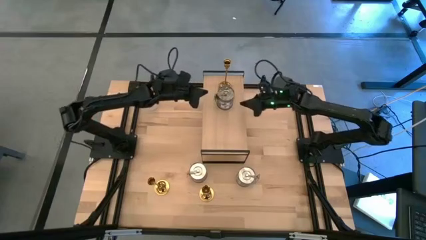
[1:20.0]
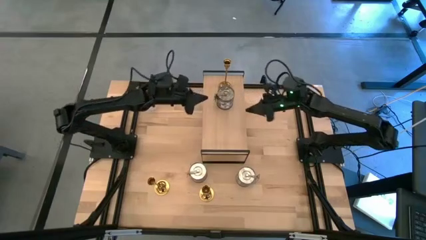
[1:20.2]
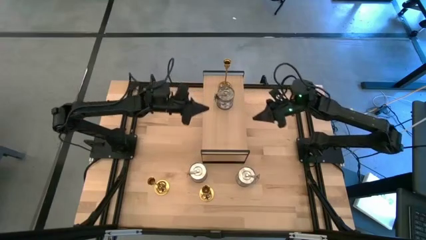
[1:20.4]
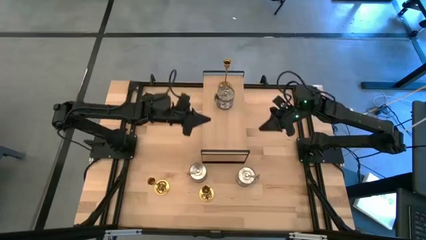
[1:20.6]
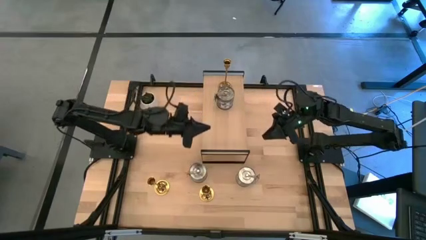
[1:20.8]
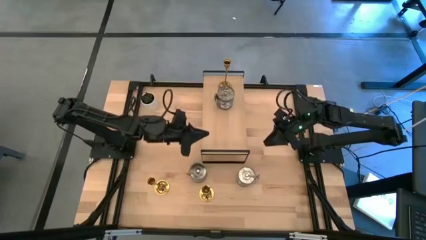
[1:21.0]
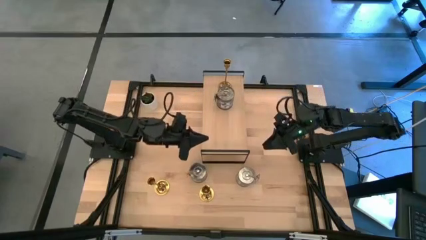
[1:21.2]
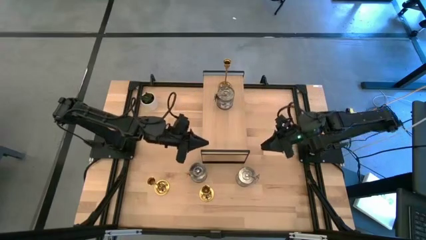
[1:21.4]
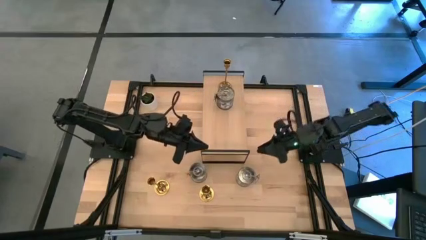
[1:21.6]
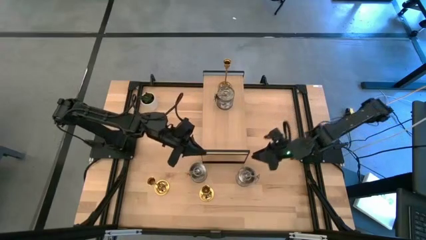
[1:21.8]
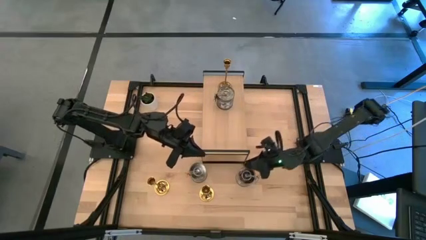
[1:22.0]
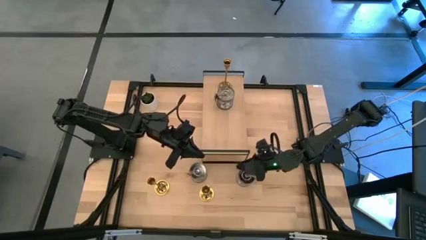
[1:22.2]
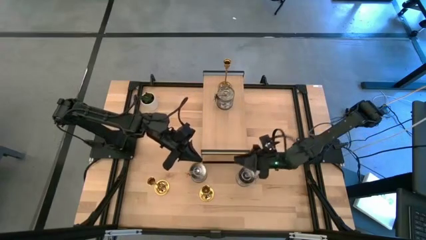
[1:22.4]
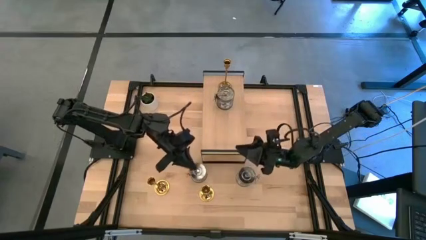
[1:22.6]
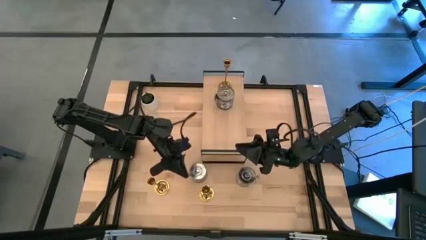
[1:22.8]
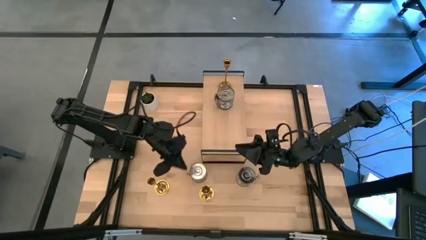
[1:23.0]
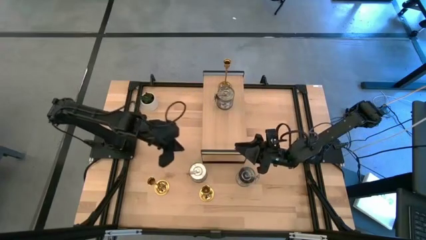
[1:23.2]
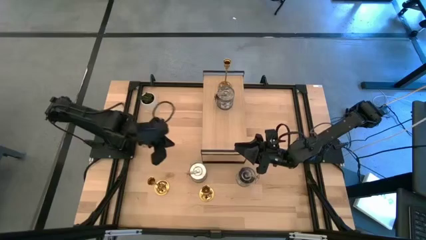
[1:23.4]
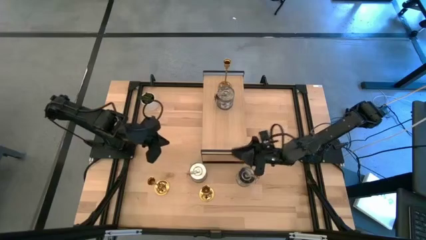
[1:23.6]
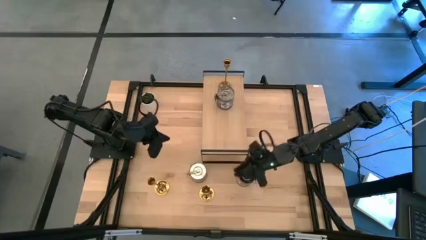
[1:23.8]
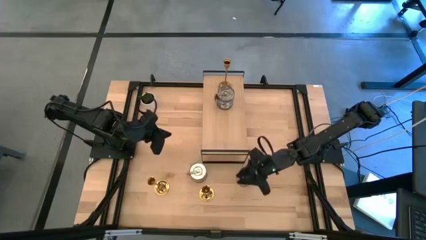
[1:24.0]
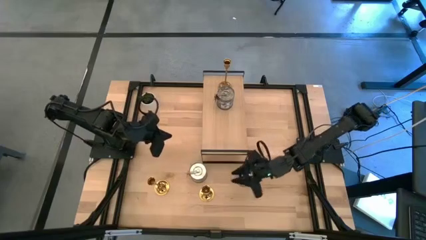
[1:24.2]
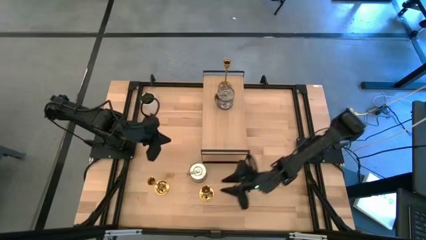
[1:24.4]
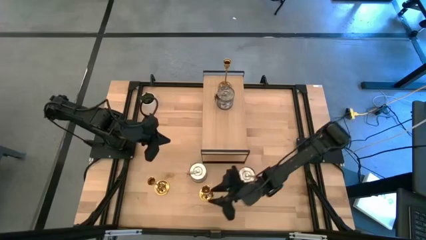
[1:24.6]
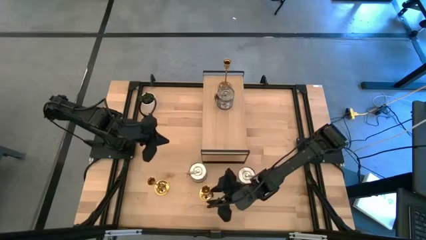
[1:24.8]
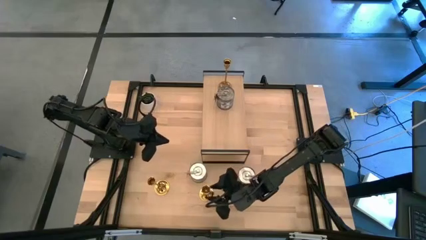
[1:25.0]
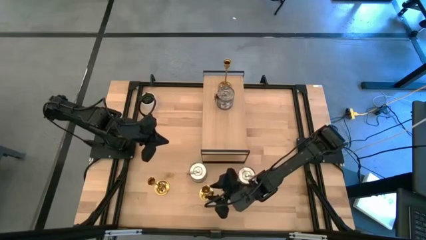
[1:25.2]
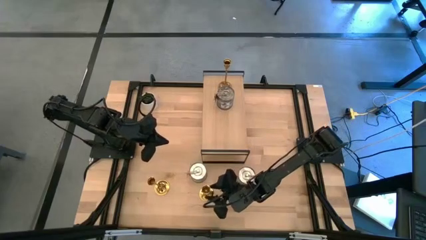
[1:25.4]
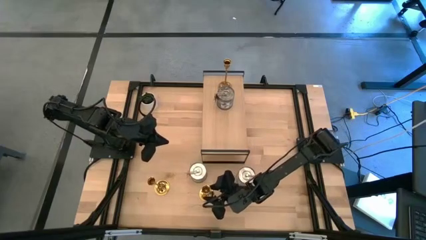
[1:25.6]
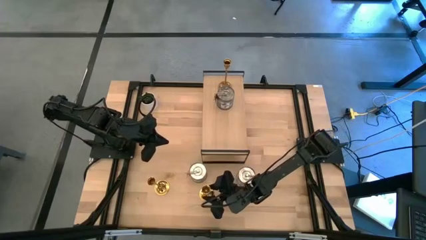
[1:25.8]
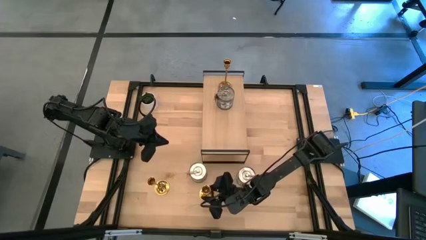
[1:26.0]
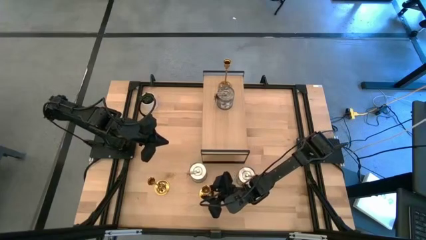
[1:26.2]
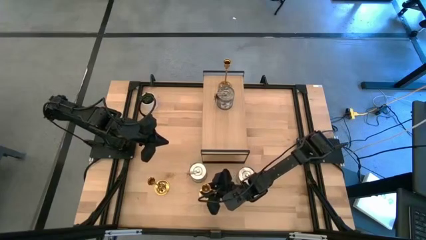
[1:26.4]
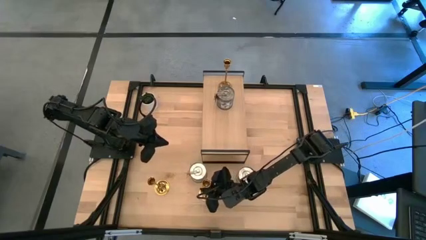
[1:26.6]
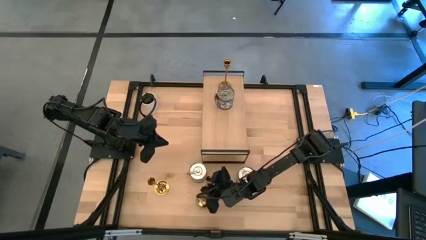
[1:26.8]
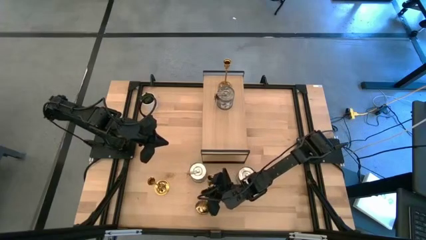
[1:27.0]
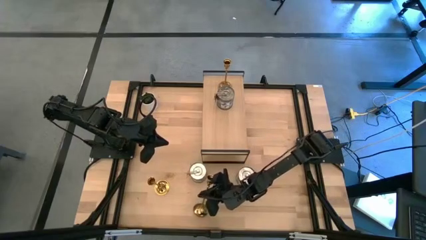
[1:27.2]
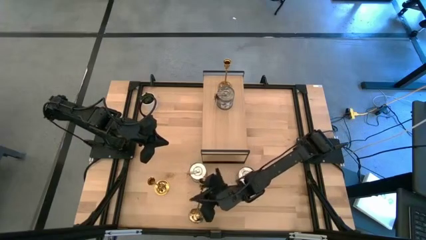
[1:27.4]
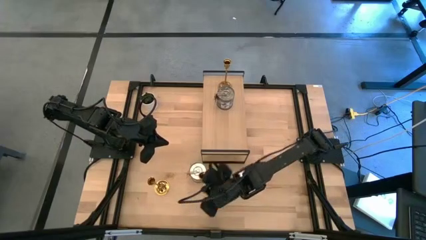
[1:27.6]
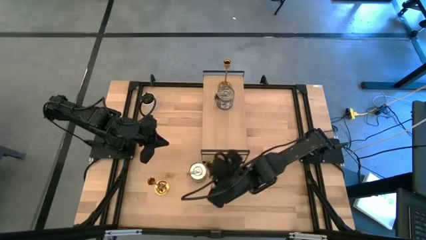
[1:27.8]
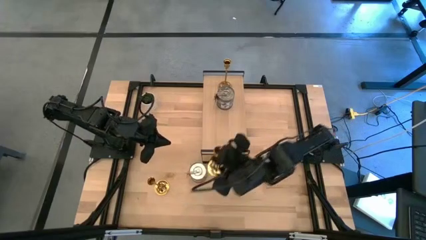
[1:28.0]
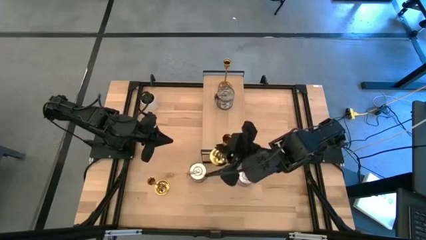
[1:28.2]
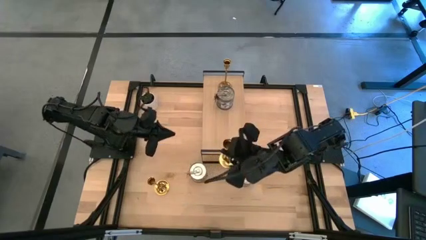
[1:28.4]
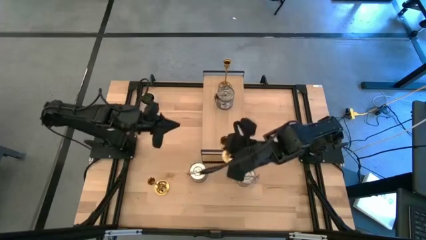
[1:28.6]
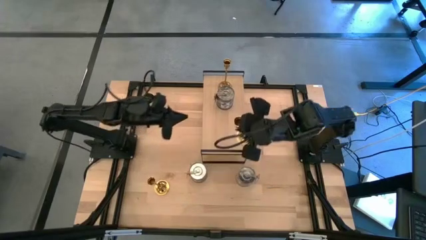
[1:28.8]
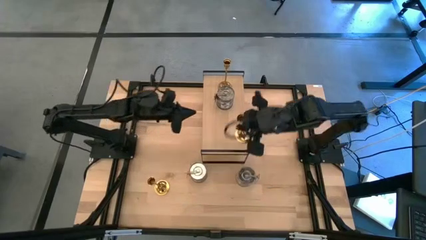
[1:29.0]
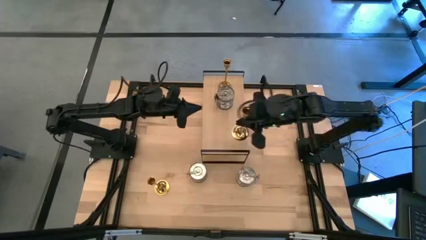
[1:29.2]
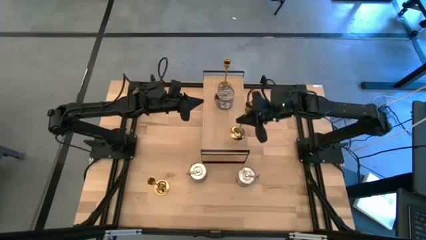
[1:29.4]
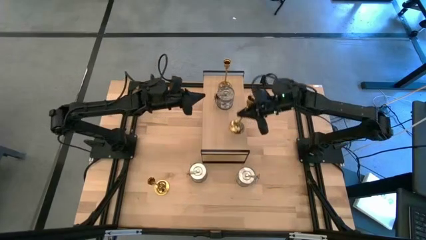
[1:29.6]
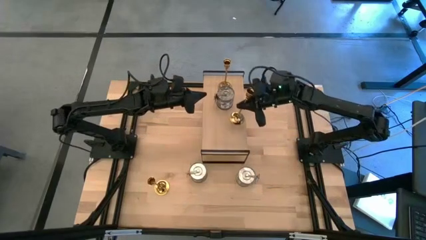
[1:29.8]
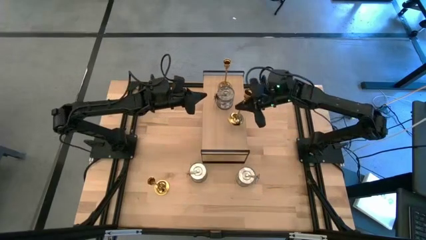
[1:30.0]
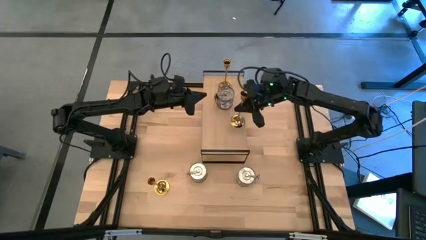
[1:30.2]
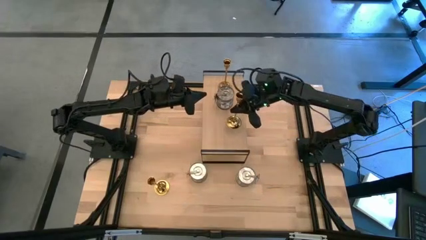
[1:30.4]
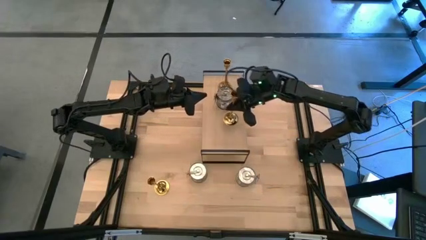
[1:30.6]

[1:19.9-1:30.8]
Task: Pick & Place candle stick holders
Put the right gold candle holder on the shelf

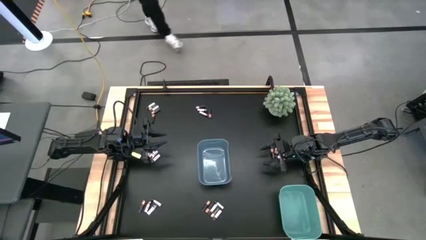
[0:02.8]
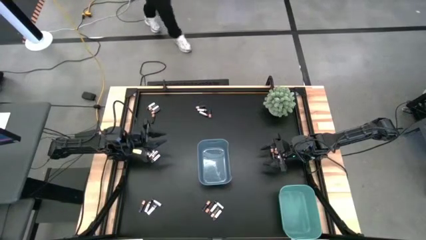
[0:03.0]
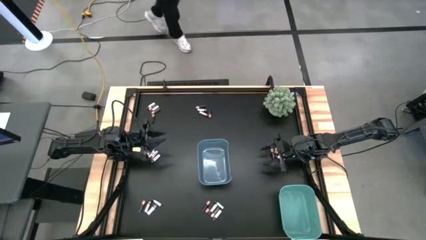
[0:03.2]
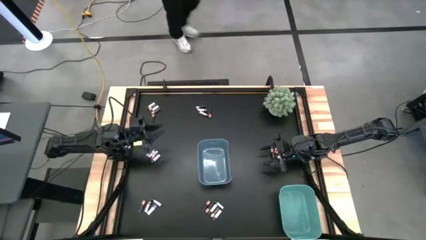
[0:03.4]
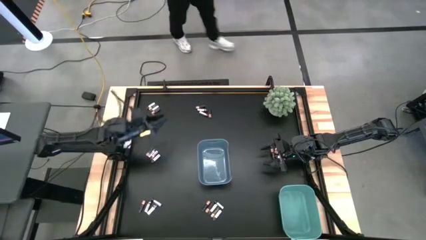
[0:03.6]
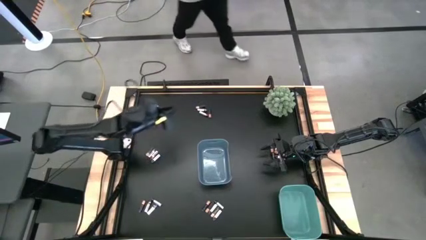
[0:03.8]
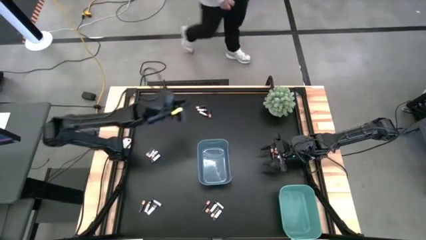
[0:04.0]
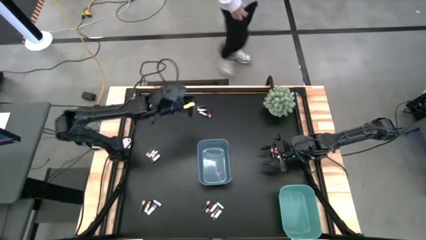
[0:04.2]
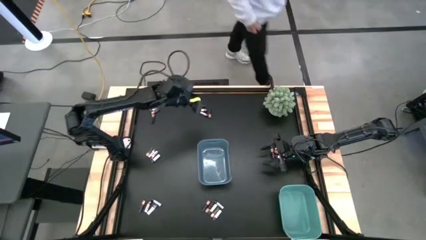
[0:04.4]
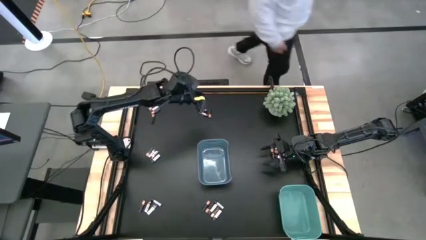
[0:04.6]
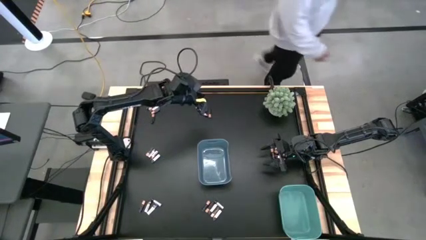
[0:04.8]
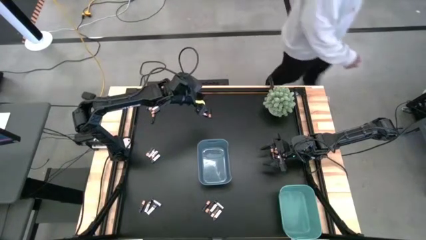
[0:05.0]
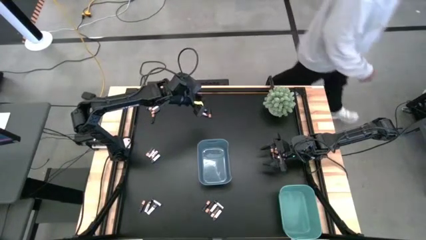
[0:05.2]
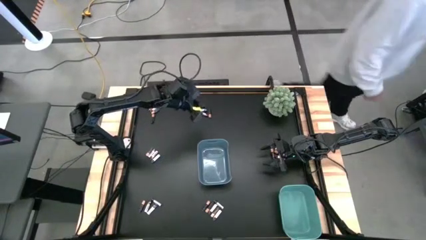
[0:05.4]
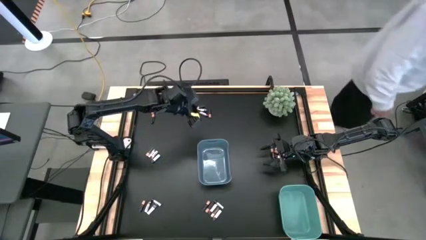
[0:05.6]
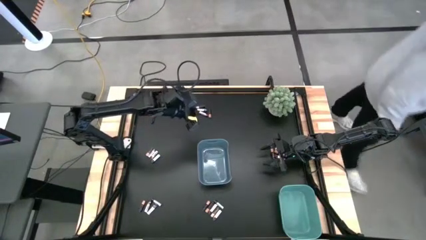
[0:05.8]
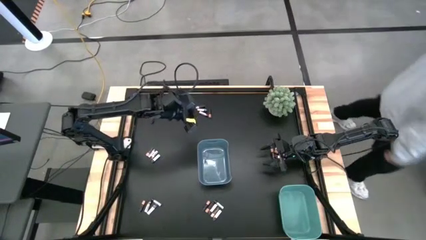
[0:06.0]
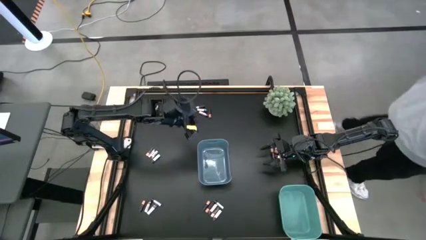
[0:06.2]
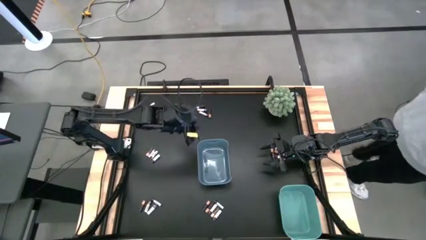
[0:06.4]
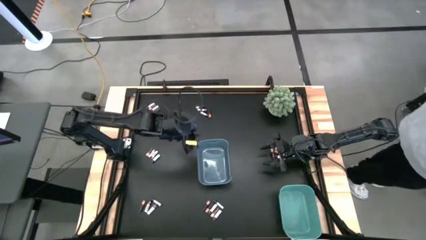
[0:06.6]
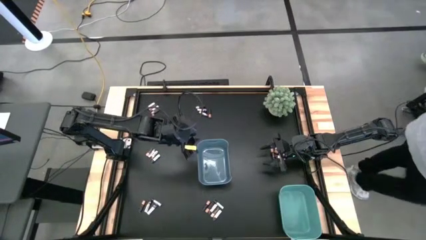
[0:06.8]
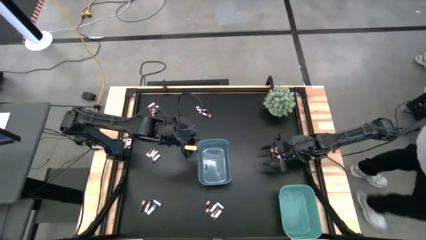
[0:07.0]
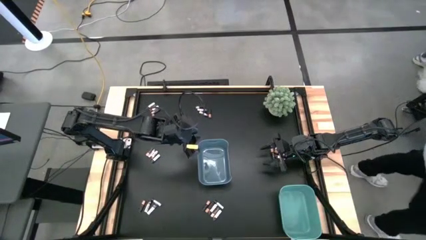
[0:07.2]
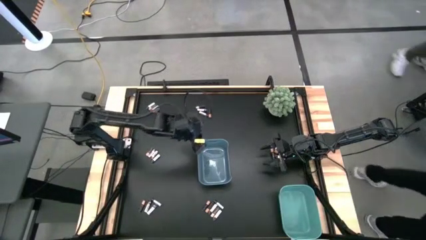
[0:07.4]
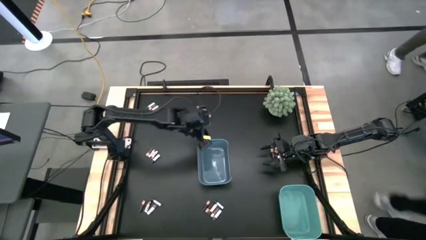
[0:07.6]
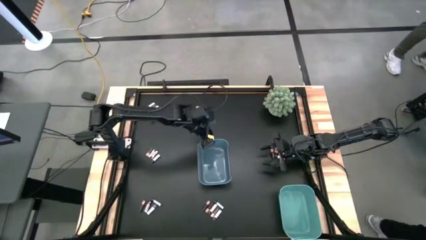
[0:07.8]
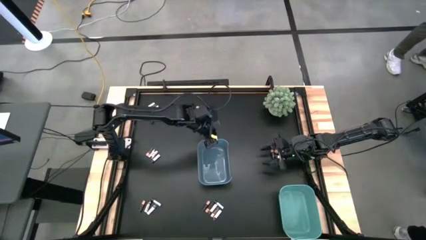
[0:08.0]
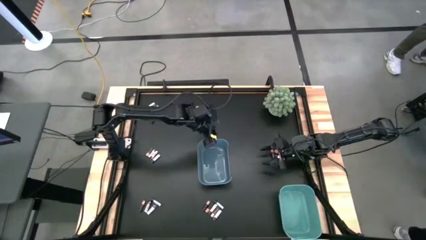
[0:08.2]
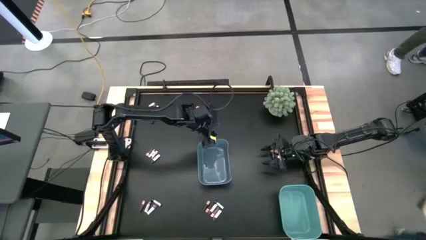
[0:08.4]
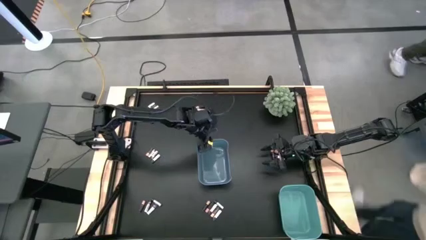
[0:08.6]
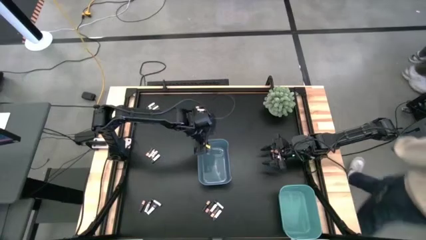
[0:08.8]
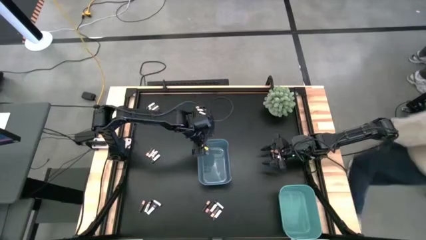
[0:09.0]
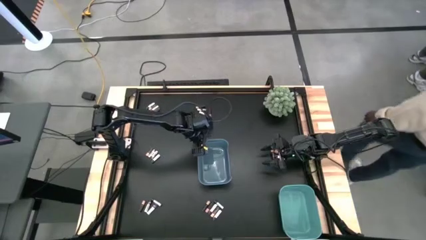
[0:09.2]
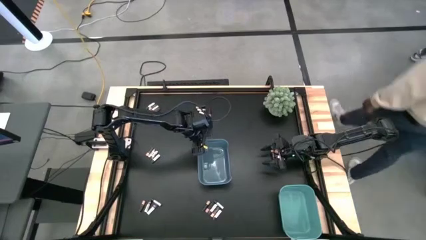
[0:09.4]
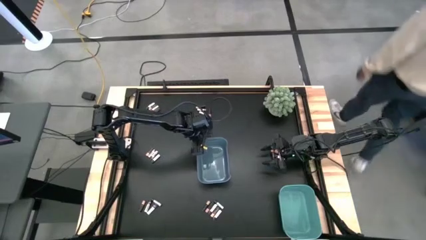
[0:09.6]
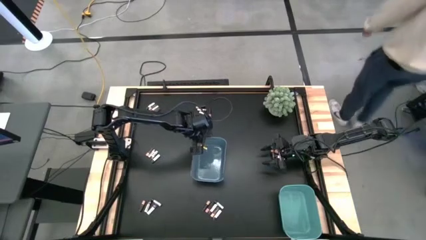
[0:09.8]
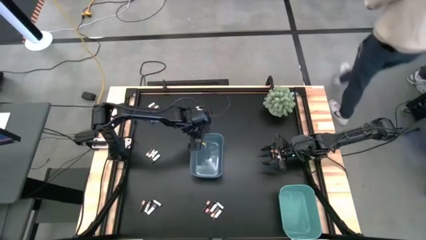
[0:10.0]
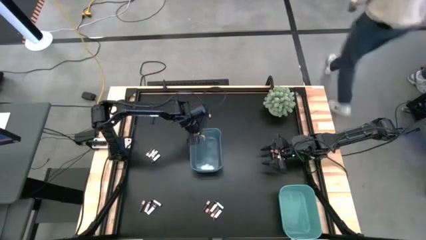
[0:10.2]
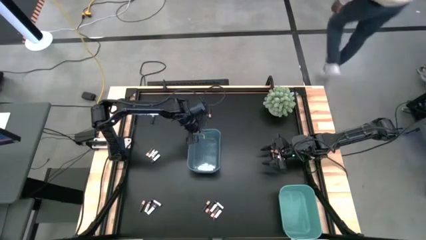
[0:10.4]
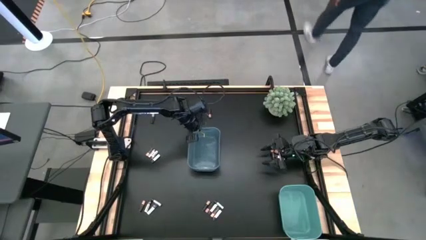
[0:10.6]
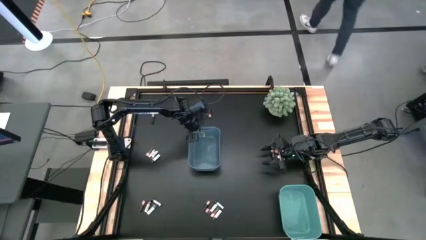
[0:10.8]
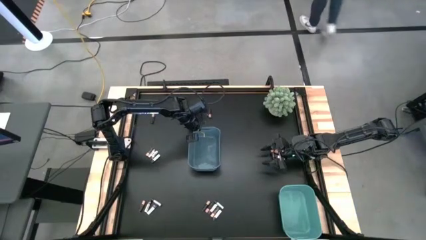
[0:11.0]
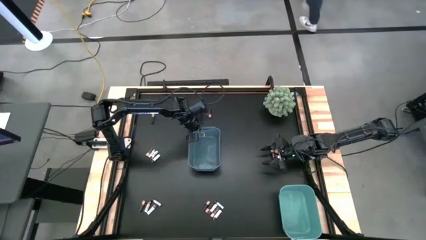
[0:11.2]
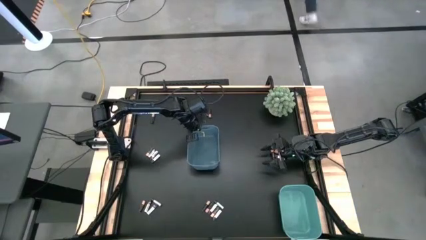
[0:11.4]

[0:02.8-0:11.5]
Task: Sort batteries
Adjust the blue bin
